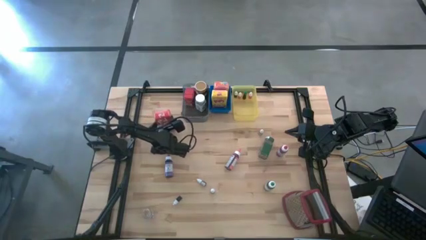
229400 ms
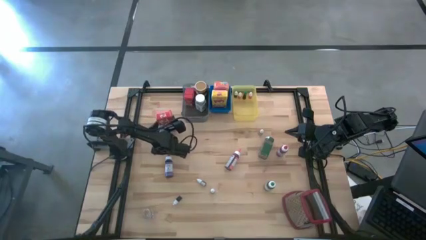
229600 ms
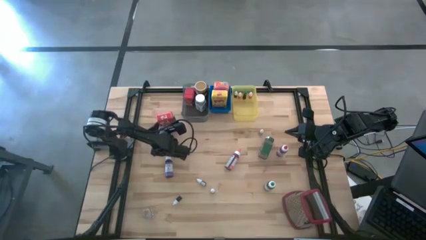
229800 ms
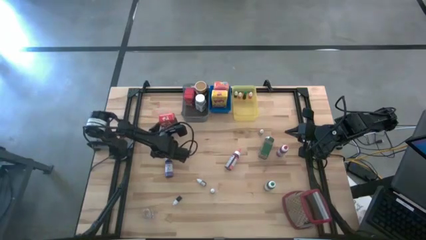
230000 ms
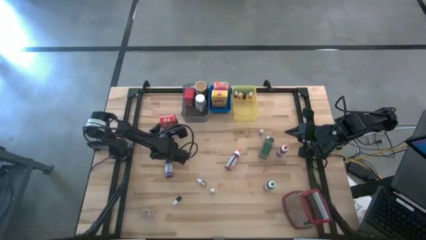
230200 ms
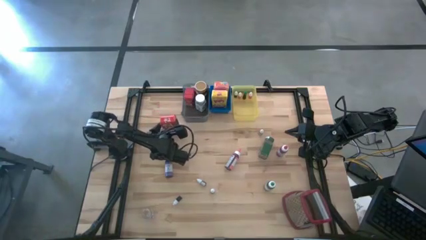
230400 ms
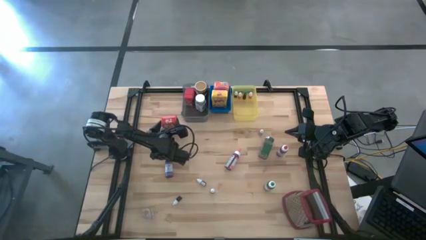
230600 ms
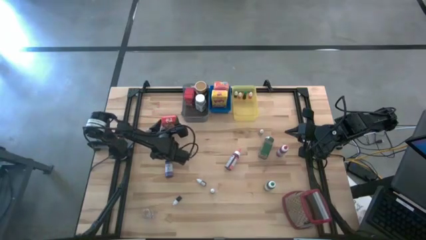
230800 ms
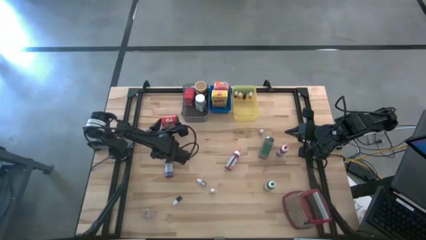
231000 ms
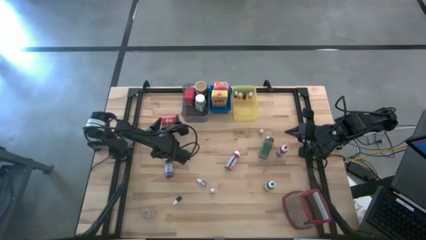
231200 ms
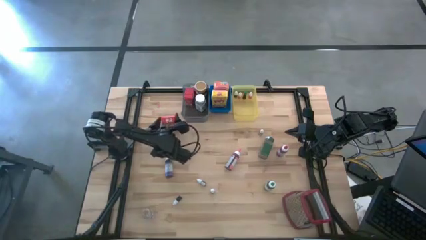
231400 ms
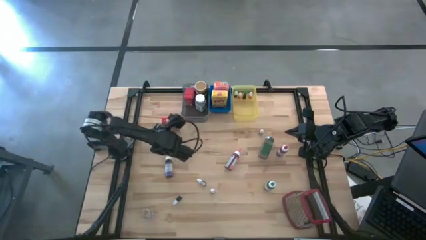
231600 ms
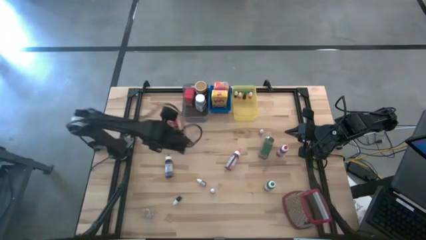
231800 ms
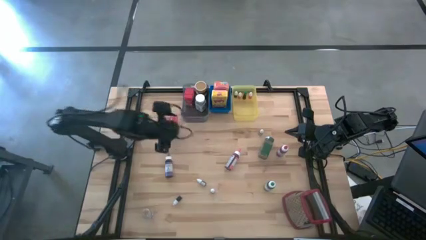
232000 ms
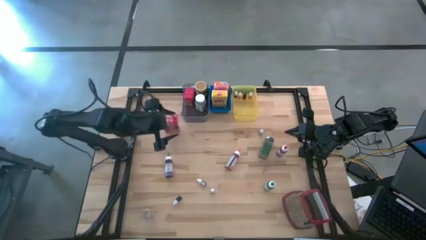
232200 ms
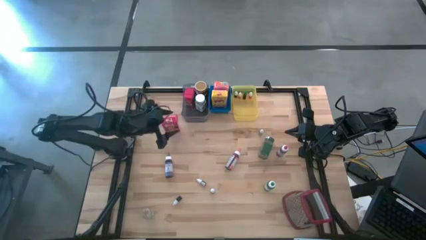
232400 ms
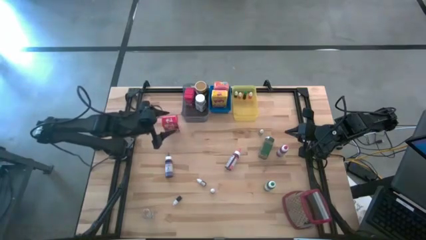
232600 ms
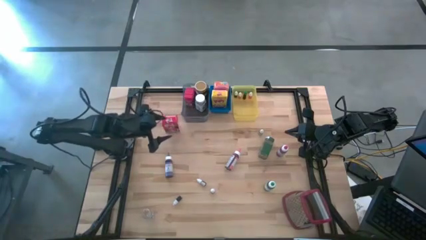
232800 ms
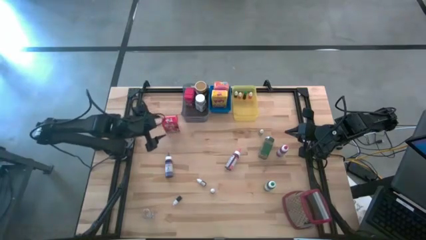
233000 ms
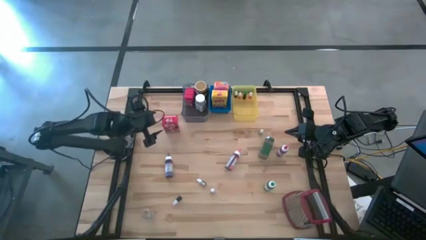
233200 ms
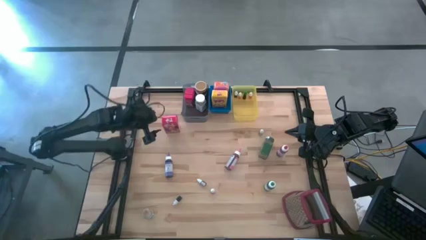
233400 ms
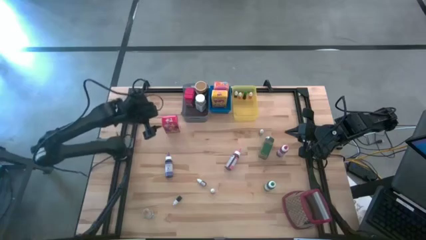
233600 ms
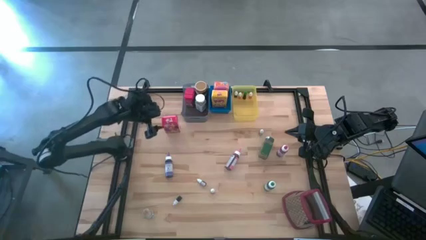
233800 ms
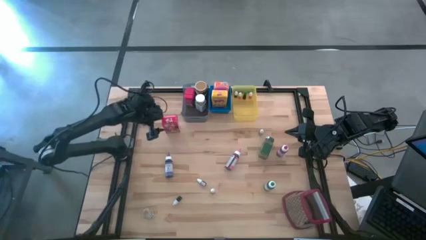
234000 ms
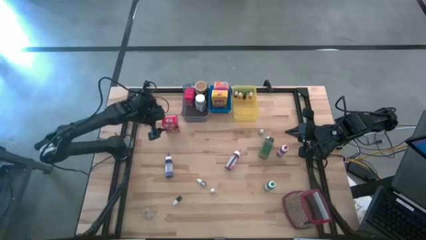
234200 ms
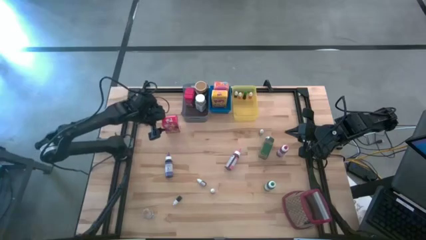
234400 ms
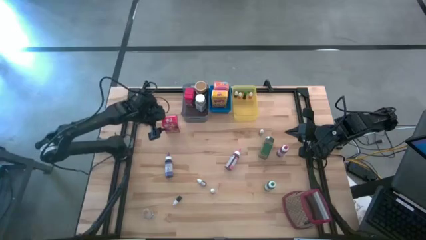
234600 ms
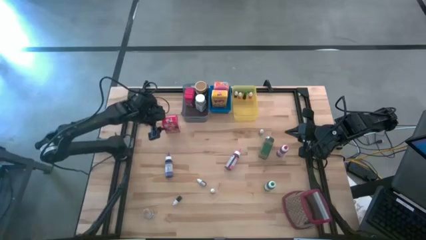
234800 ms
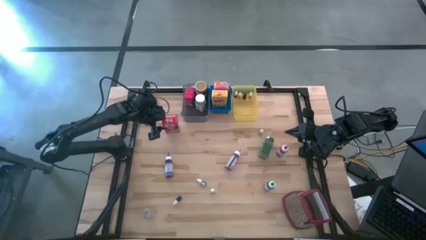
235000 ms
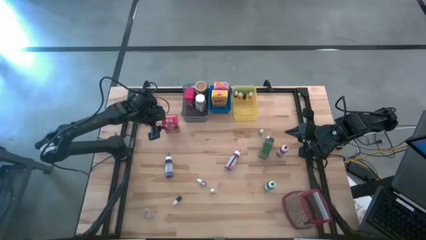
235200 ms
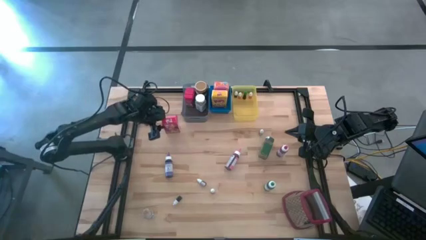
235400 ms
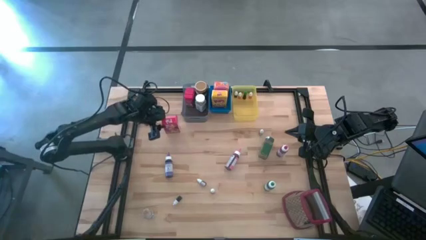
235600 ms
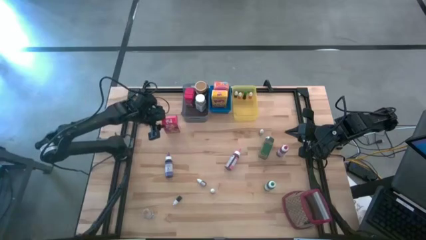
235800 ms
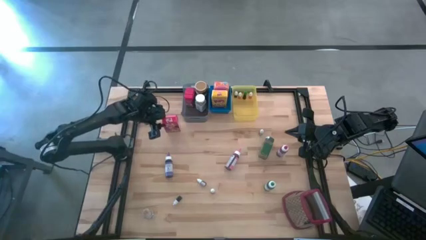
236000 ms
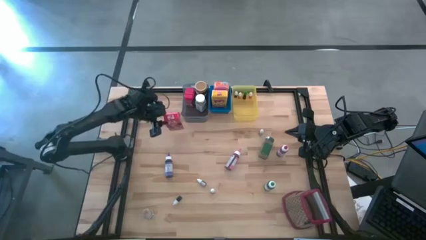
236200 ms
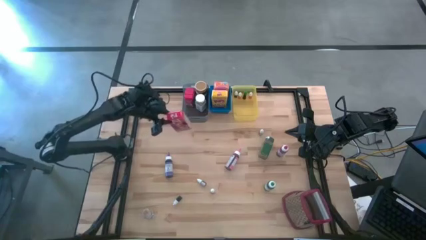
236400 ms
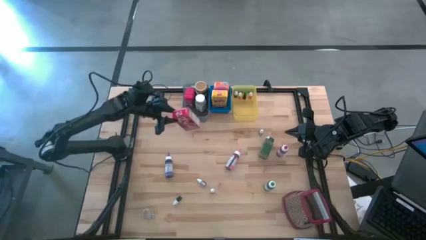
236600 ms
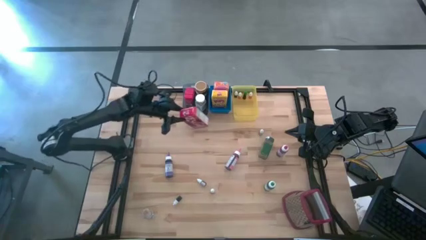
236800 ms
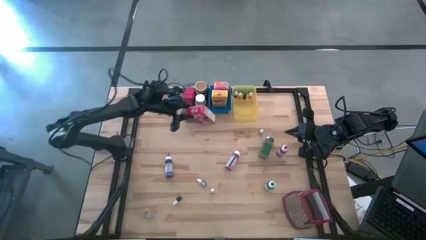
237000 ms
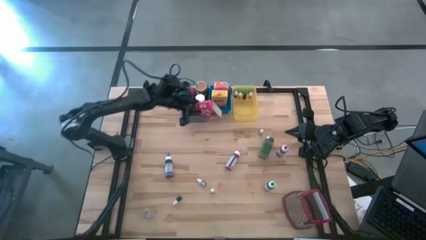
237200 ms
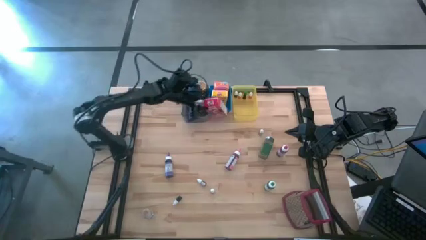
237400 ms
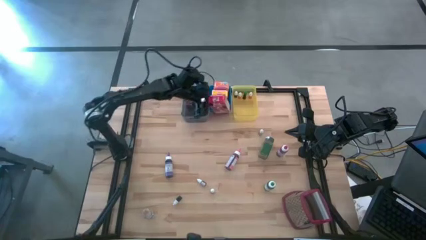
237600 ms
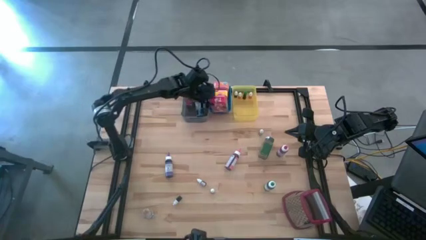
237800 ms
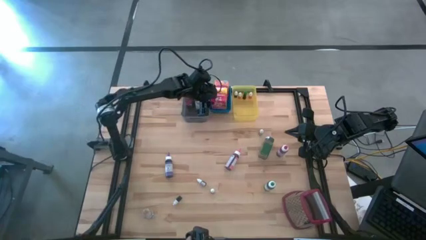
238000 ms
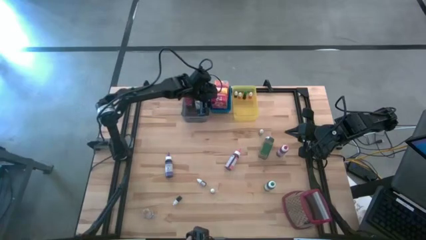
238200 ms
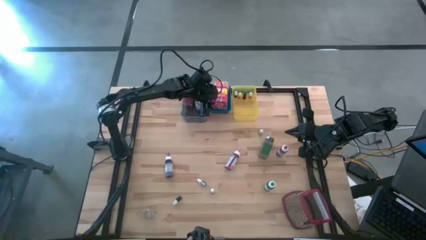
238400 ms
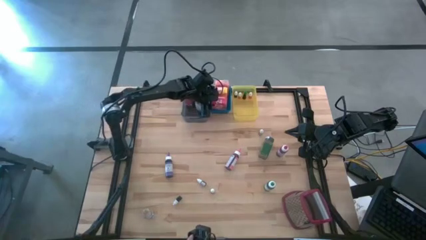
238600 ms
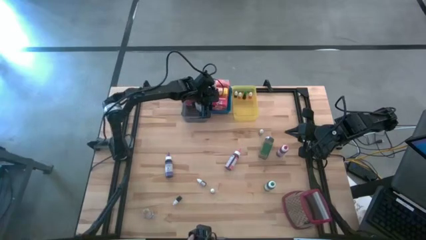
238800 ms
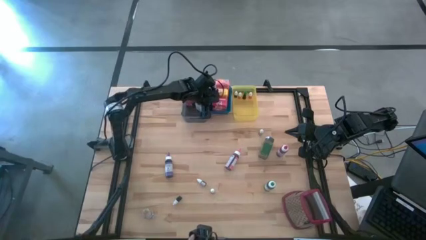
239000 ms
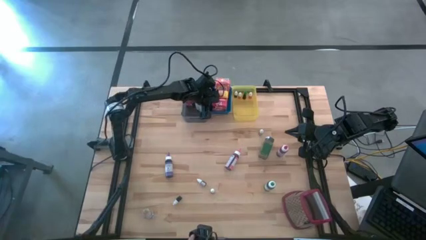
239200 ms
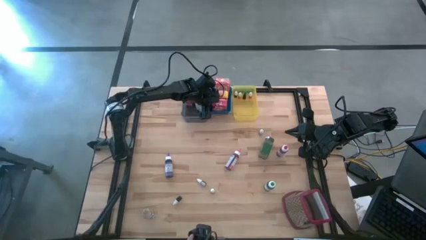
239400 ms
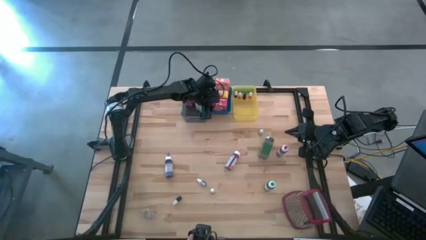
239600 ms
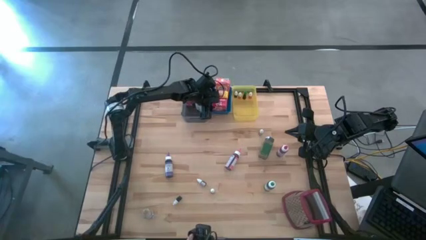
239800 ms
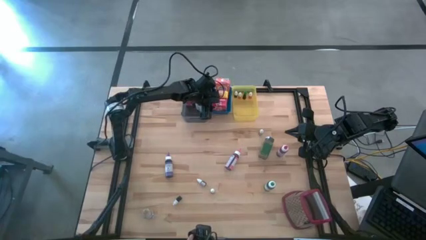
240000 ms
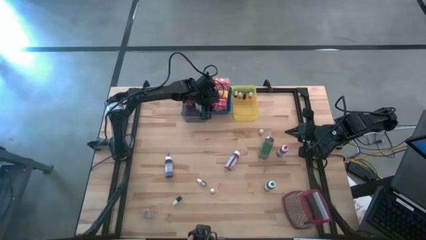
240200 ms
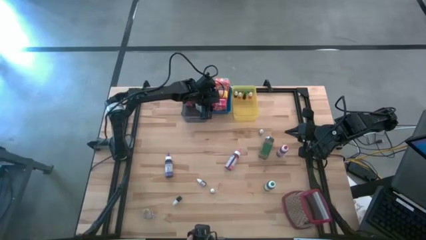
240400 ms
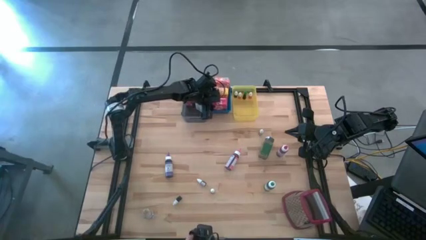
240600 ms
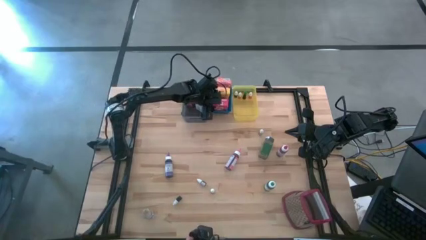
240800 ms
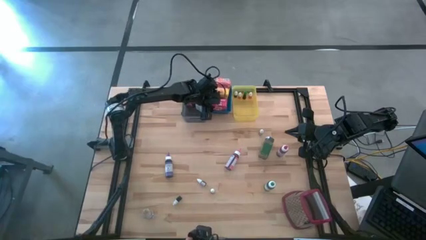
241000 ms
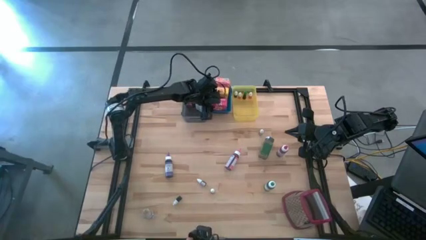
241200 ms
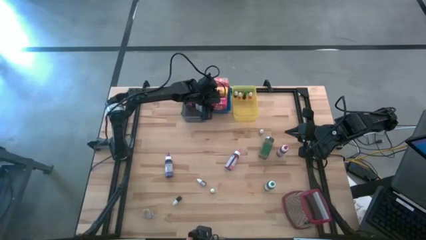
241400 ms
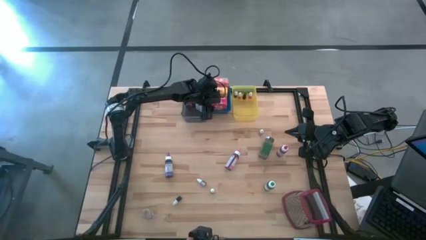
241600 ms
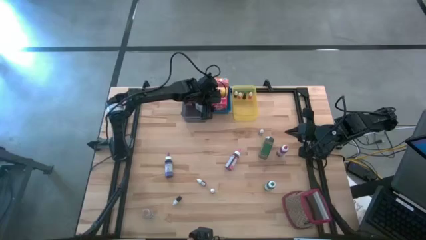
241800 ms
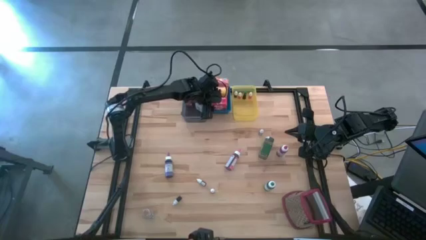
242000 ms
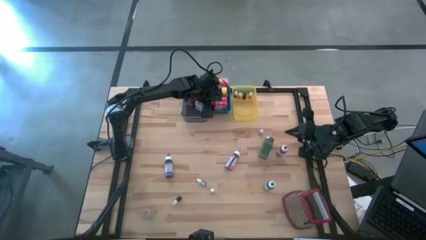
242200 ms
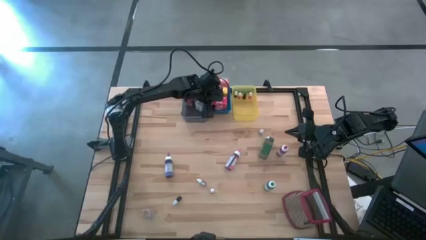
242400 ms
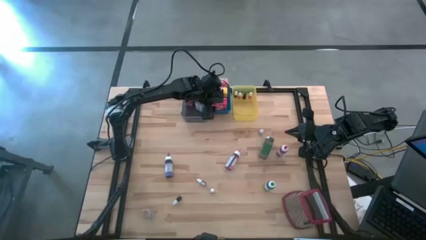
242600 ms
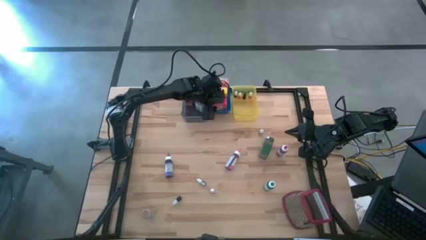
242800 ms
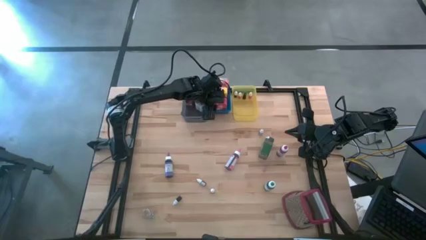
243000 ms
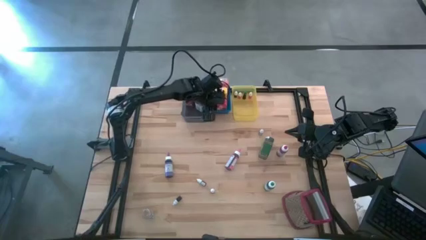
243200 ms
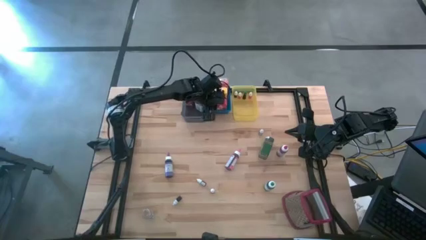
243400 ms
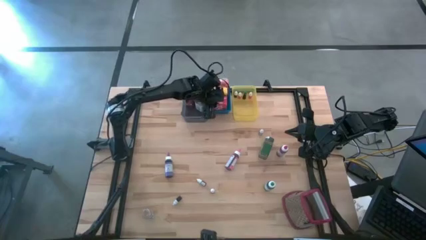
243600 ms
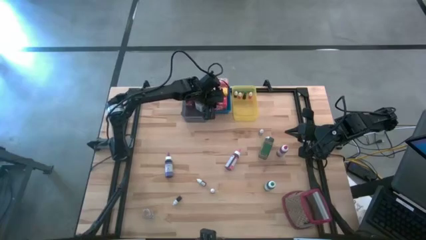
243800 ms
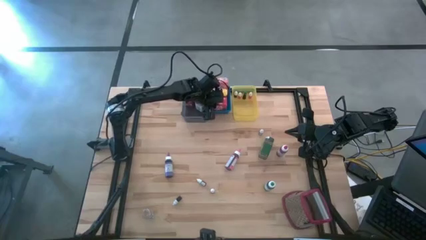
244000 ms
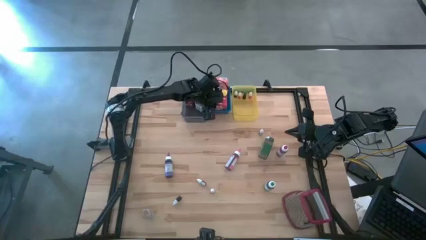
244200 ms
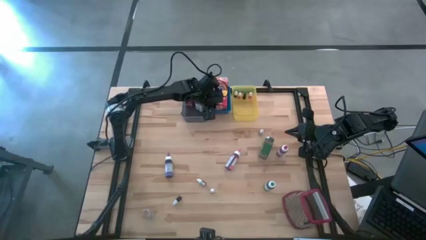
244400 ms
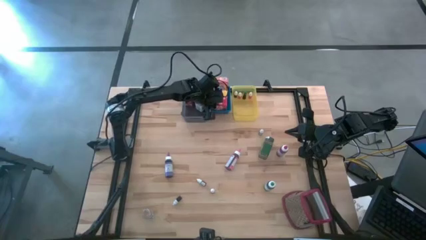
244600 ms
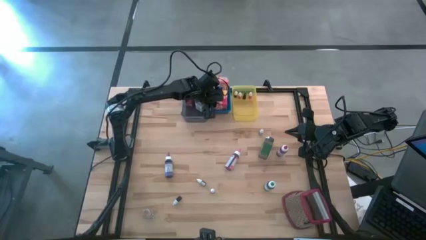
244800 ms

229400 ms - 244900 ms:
Task: Pick & Place Kitchen Items
Put the red cereal box into the blue bin
